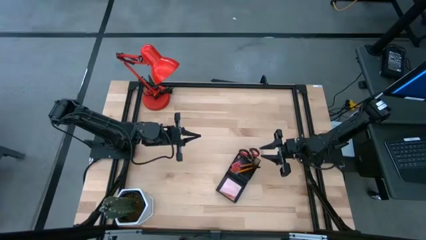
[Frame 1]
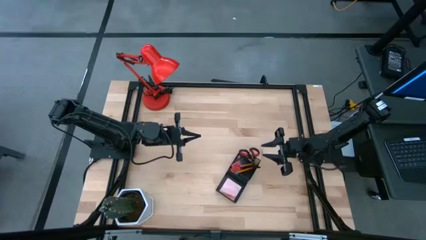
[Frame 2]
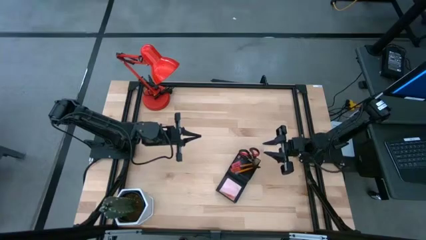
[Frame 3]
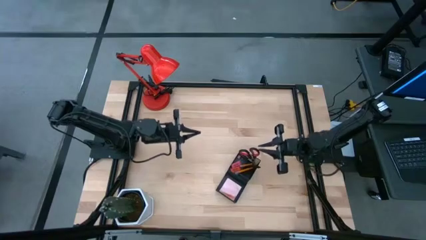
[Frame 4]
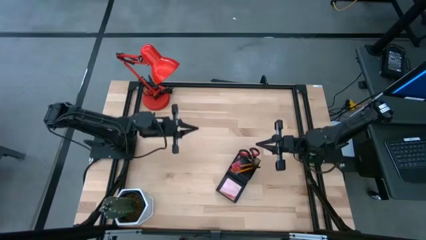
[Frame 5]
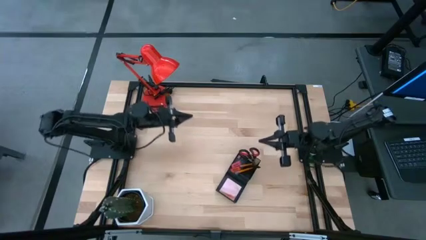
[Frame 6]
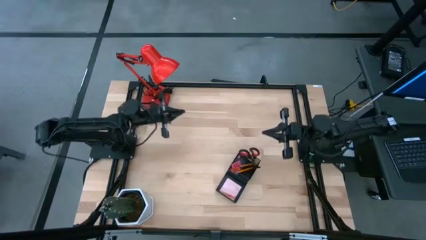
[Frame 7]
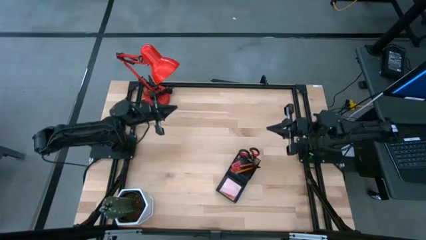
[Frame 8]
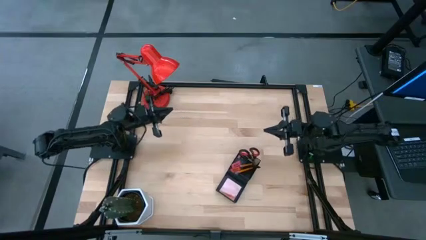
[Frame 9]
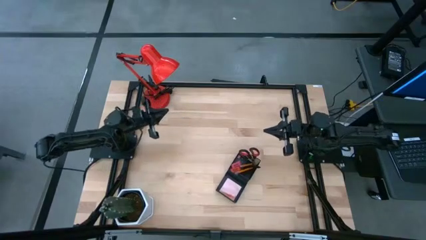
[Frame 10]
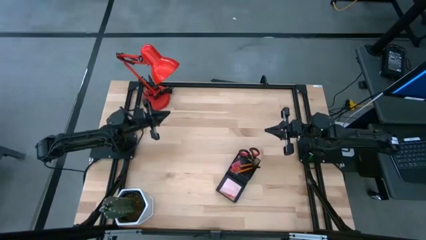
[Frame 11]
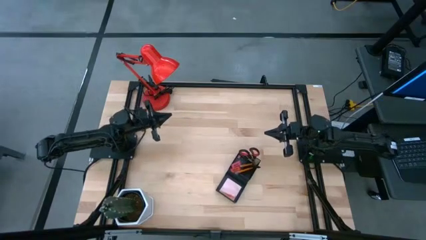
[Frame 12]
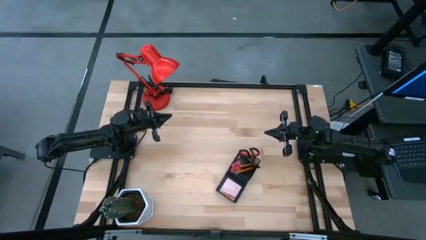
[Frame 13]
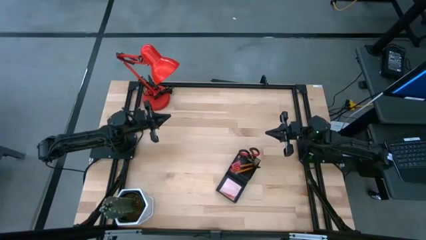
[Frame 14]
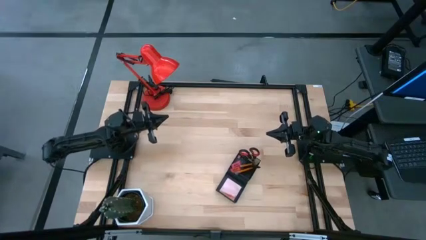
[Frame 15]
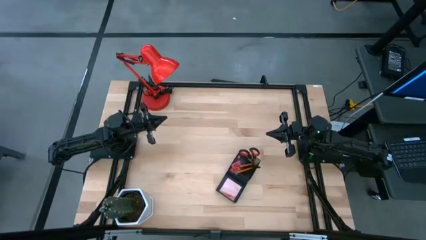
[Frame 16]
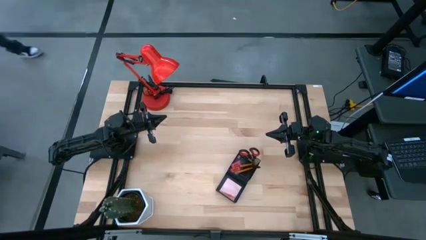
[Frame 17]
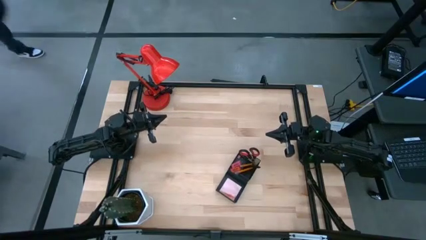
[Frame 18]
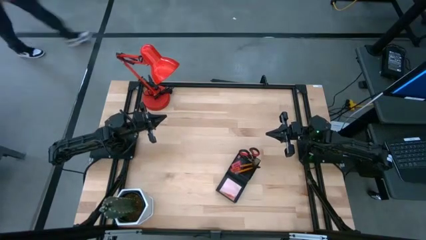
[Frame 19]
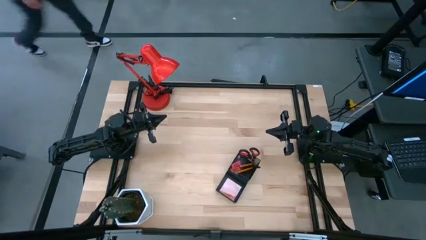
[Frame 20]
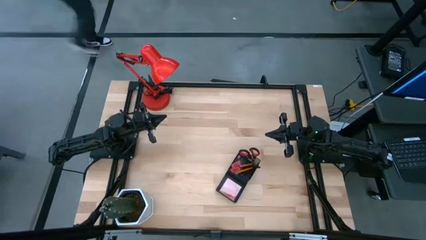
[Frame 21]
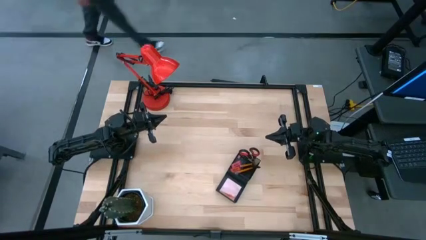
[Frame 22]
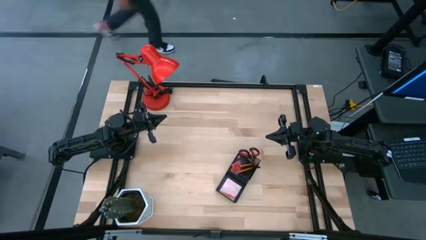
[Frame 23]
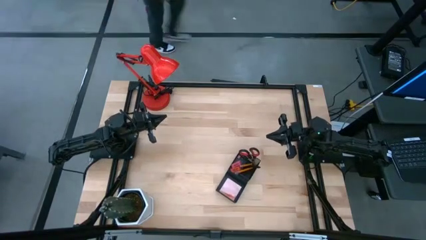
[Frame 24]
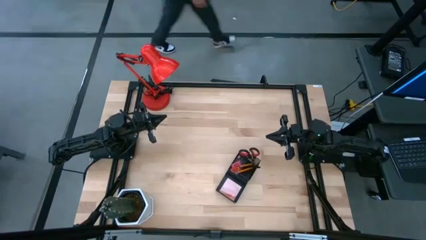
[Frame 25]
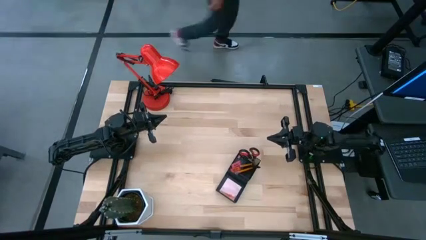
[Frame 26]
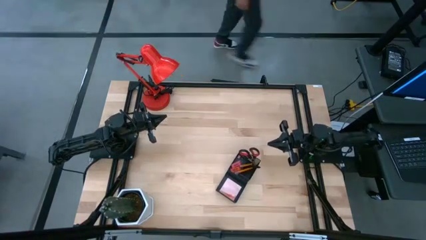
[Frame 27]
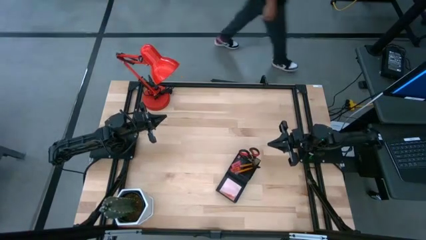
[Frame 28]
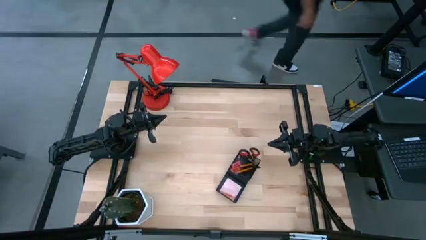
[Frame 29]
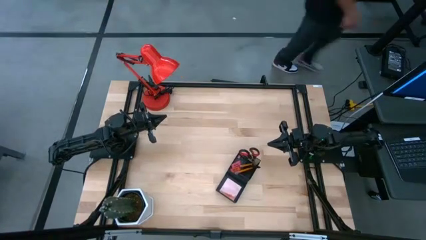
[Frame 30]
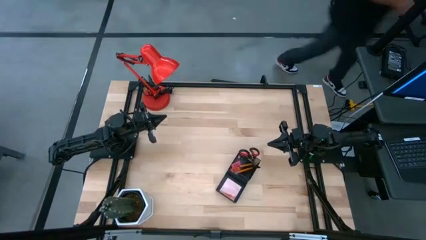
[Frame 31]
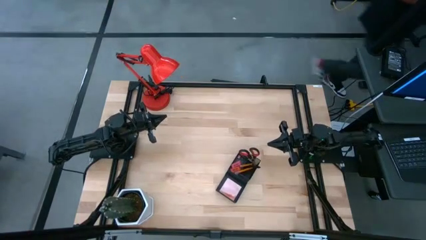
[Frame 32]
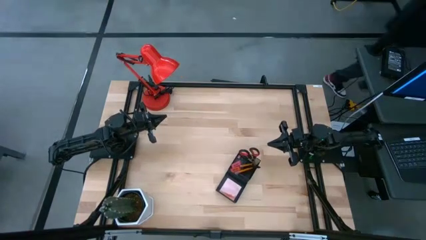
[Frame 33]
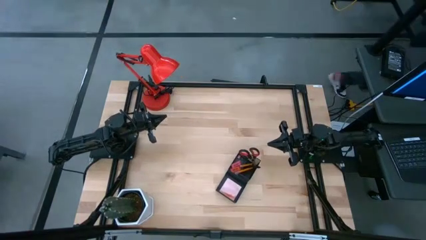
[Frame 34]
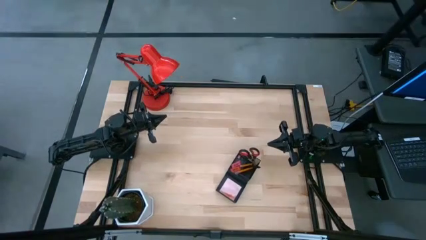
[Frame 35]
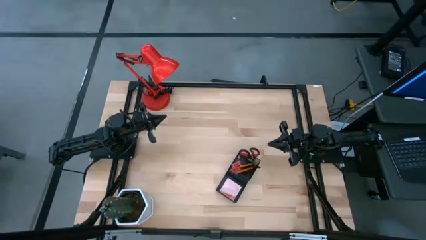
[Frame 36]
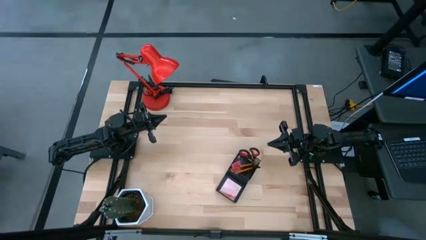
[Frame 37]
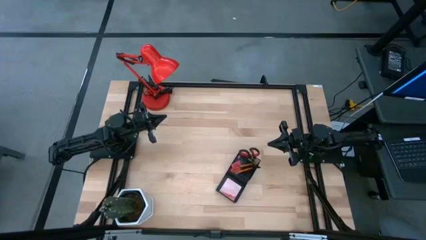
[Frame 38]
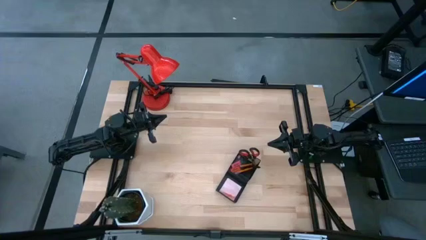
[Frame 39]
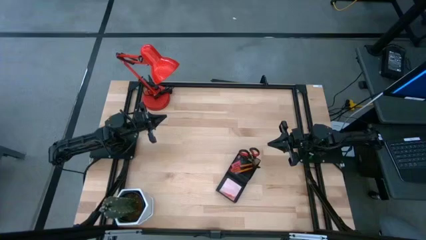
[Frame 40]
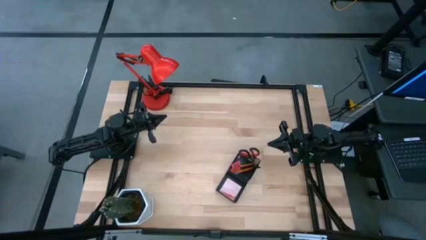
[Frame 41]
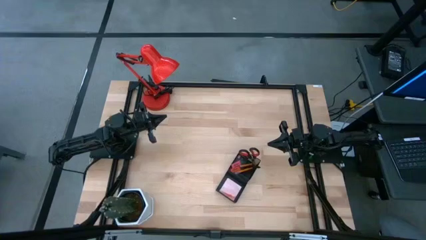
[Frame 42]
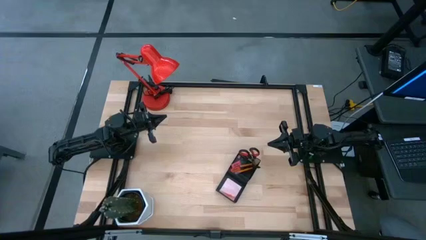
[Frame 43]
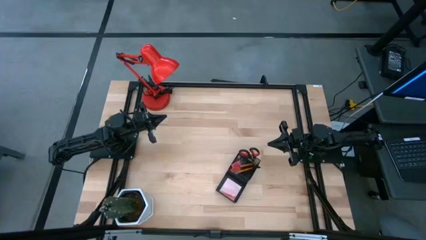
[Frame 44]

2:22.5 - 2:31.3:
Task: Pick and place office supplies into organizer
Return to Home Position
